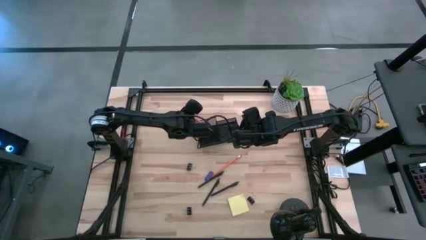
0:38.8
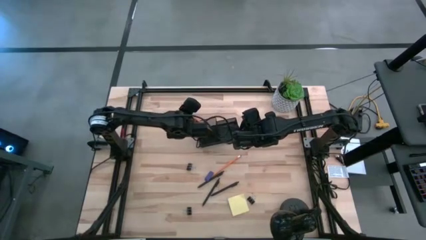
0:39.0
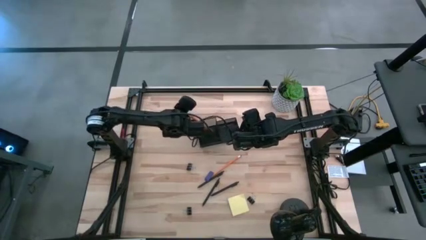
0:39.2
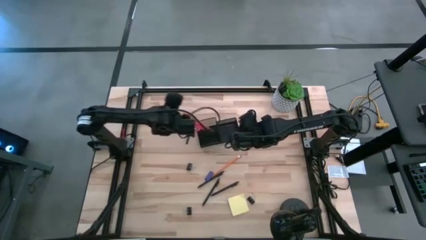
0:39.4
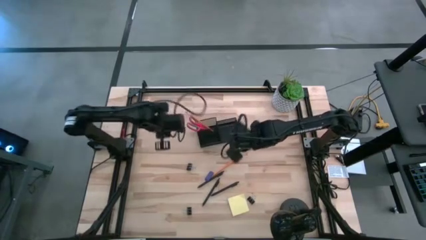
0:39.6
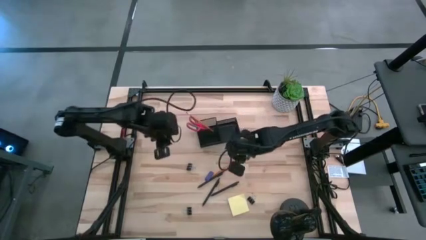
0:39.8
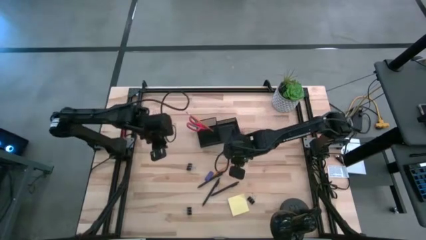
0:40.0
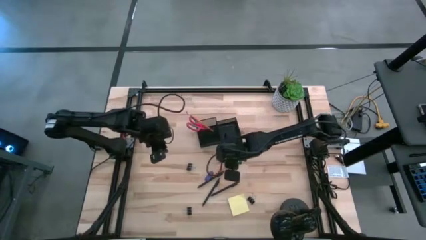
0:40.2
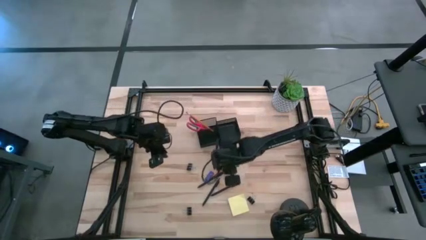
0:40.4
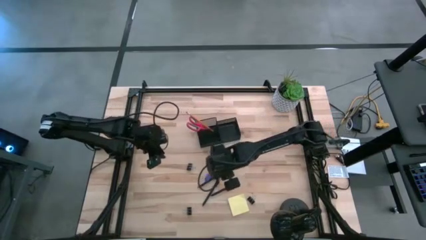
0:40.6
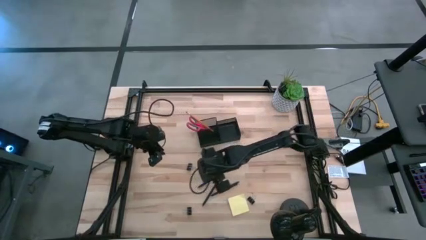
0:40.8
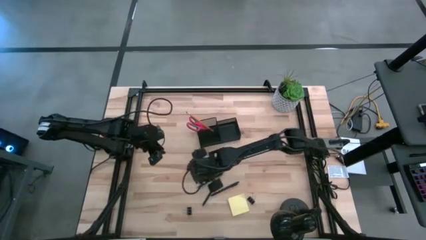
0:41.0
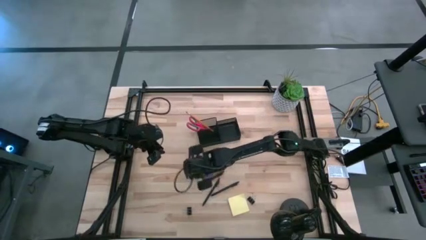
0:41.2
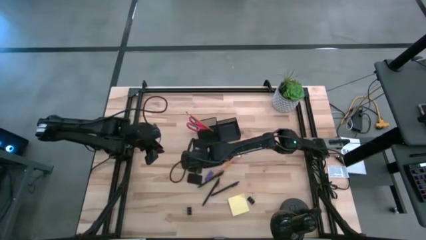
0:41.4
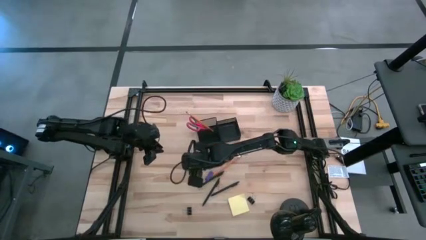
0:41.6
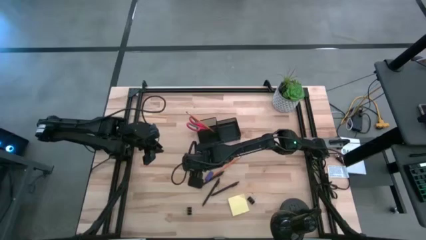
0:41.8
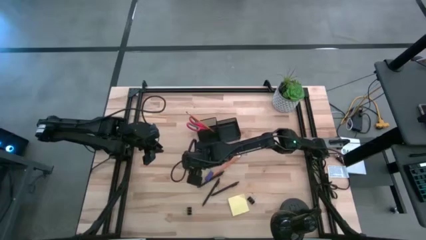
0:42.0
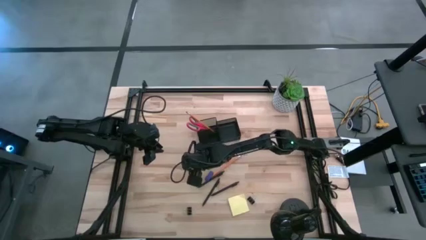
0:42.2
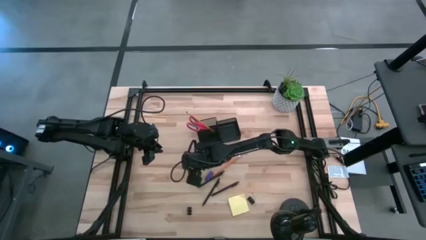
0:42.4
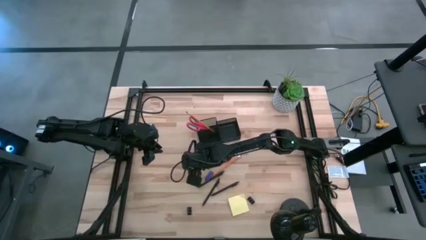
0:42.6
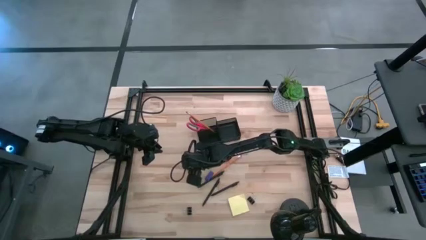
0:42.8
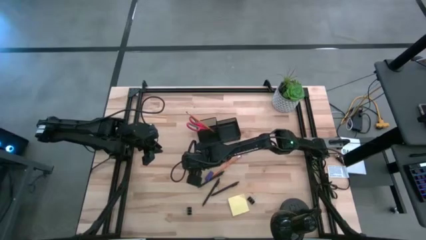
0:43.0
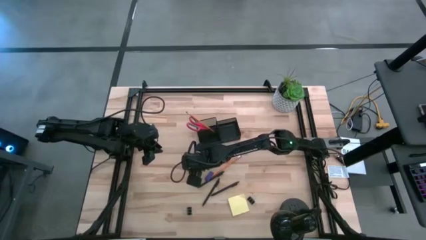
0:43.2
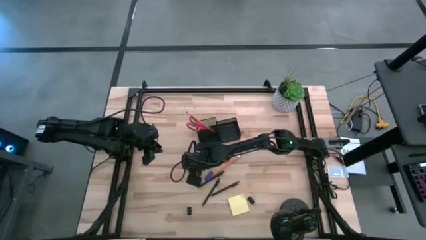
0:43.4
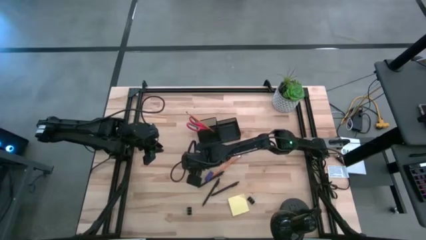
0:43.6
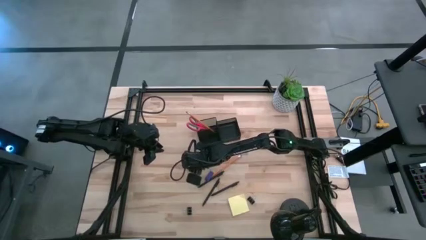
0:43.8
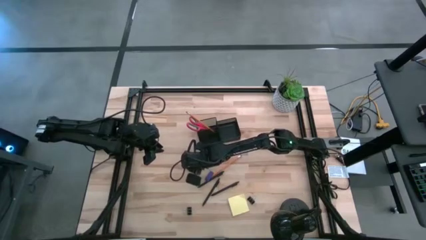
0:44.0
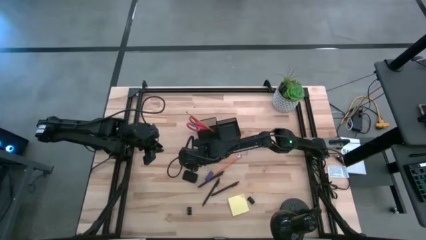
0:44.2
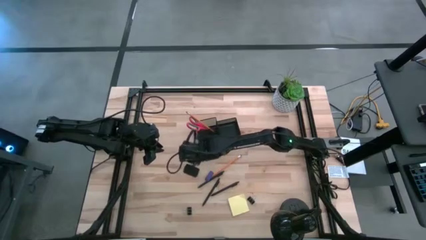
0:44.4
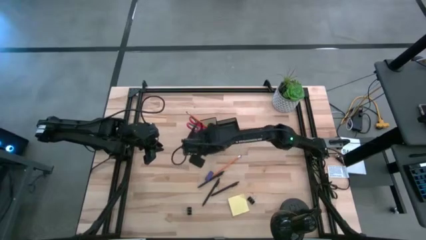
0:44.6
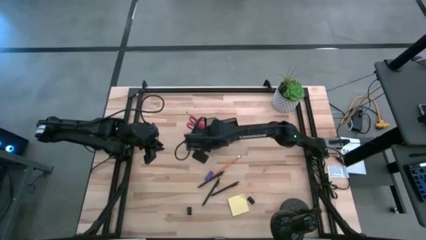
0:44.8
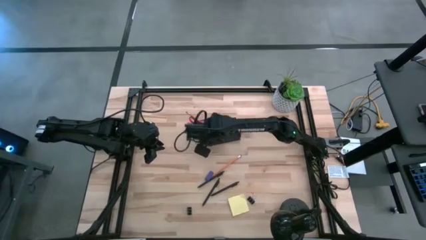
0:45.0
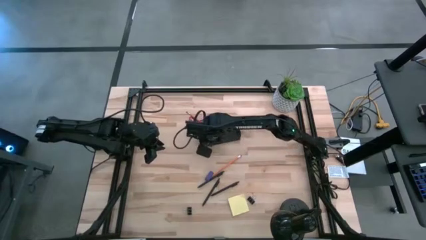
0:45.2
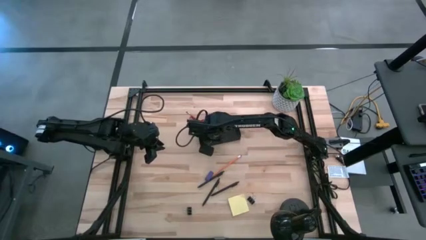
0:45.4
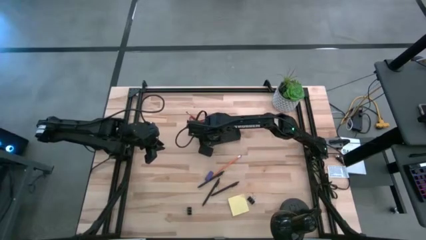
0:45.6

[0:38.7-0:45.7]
Task: Pick and place office supplies into organizer
Put the top binder clip into the bottom left section of the desk organizer

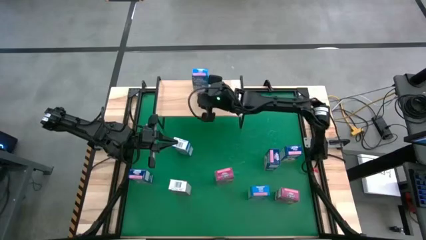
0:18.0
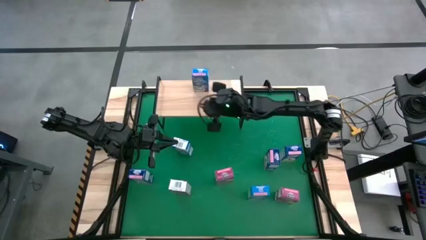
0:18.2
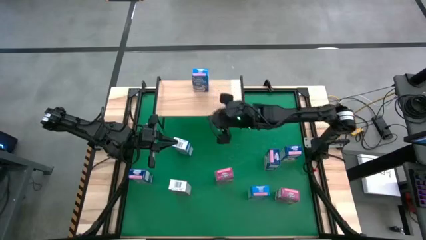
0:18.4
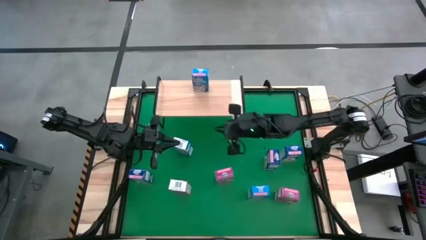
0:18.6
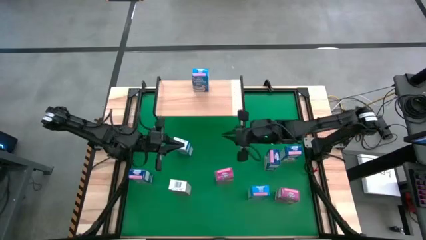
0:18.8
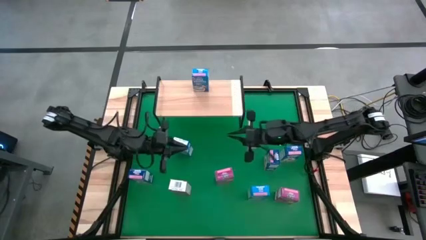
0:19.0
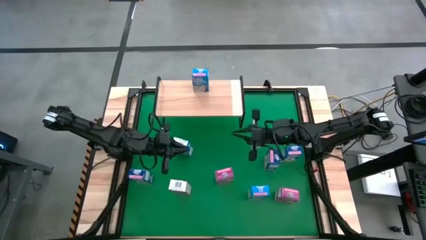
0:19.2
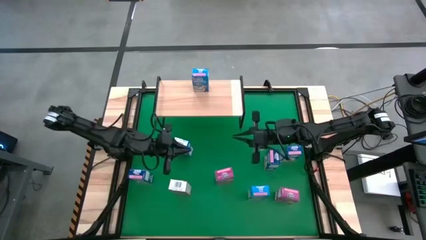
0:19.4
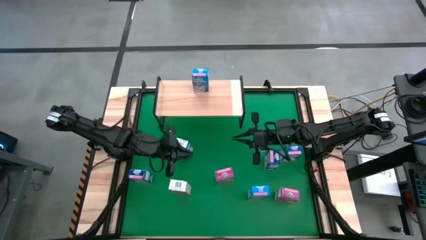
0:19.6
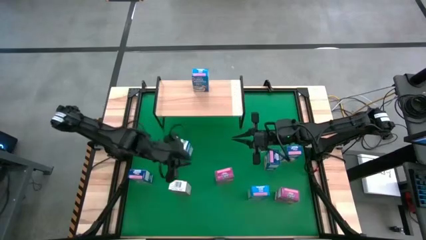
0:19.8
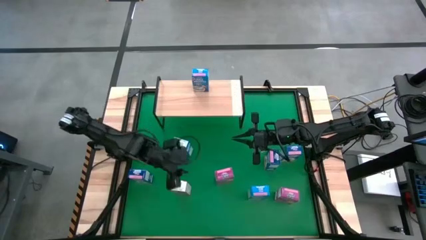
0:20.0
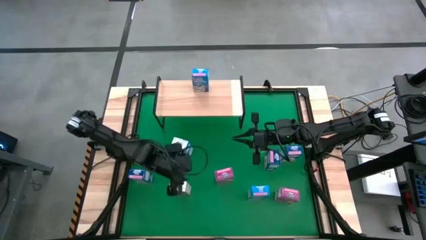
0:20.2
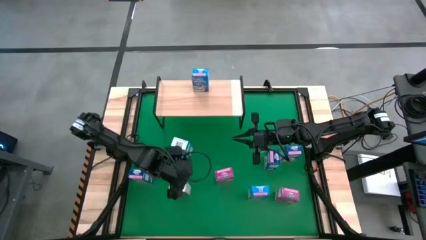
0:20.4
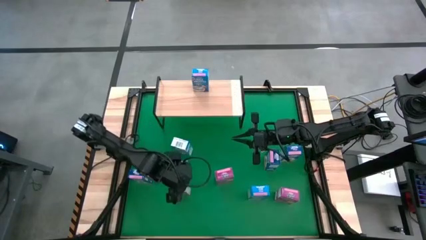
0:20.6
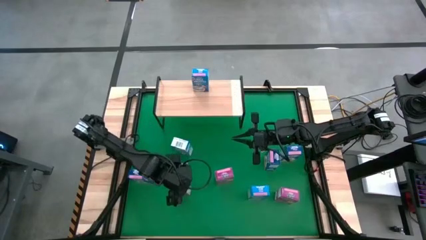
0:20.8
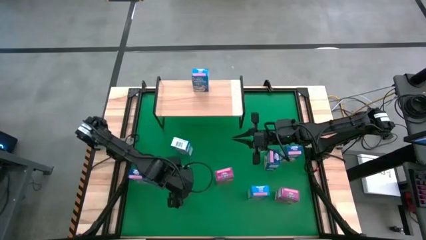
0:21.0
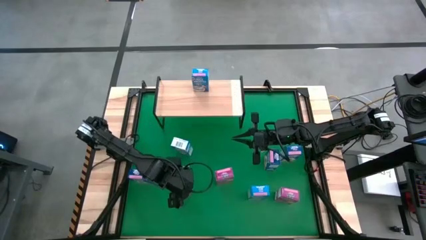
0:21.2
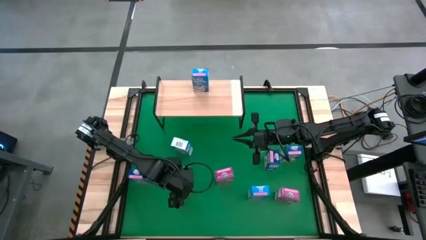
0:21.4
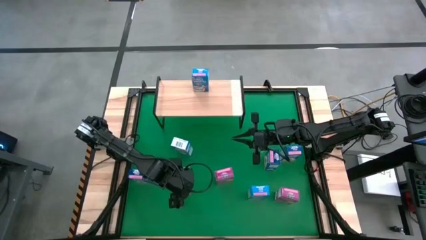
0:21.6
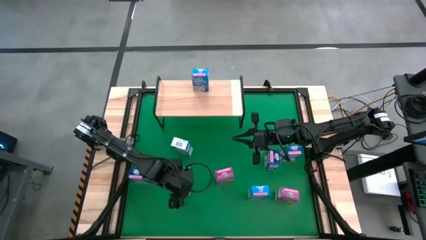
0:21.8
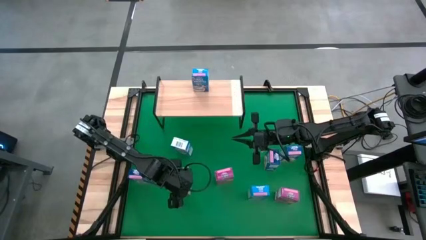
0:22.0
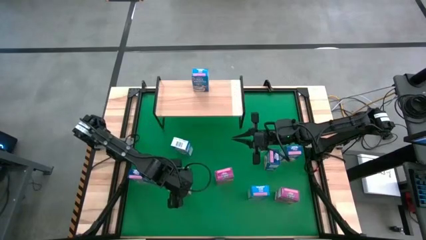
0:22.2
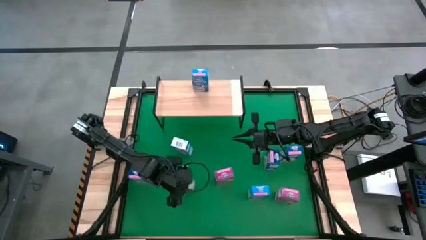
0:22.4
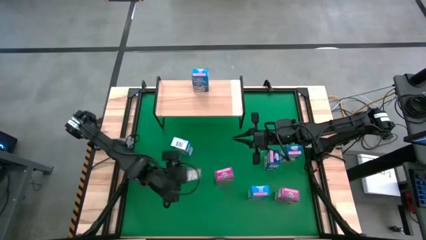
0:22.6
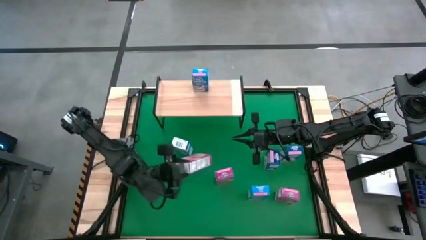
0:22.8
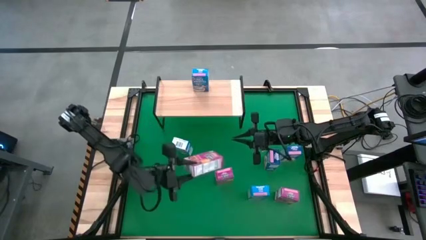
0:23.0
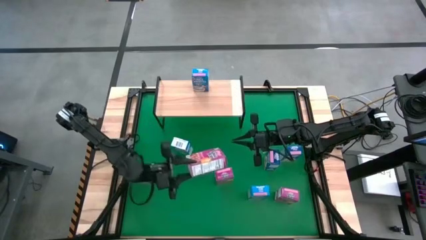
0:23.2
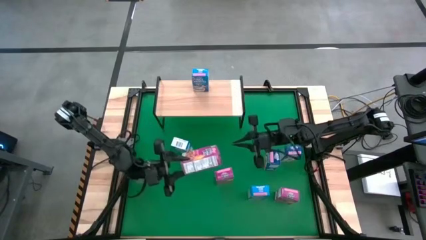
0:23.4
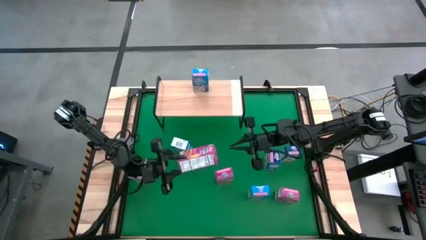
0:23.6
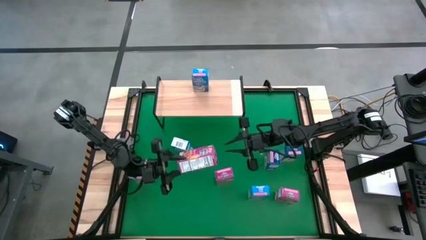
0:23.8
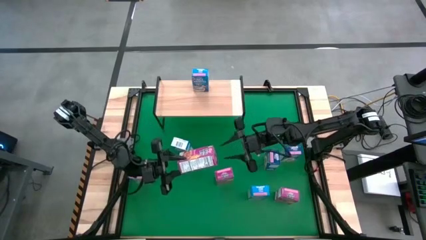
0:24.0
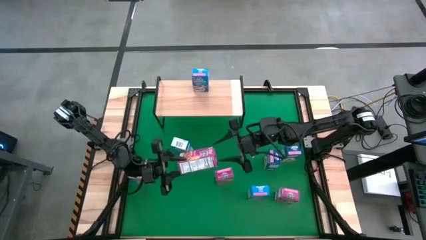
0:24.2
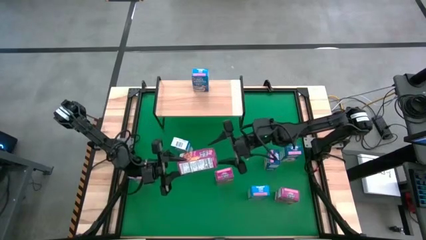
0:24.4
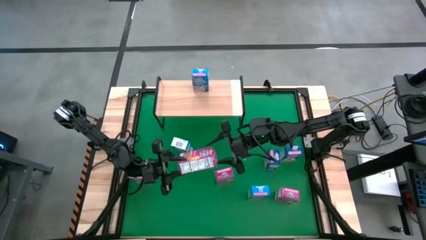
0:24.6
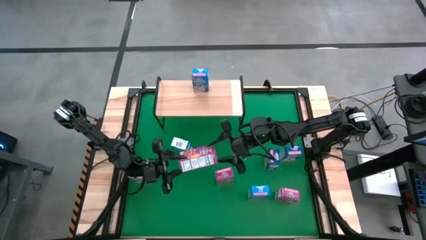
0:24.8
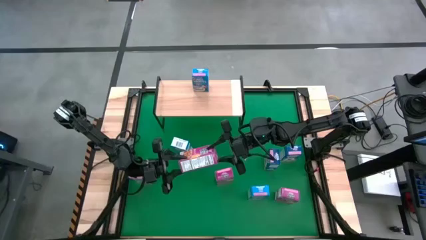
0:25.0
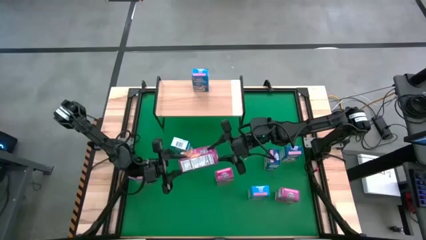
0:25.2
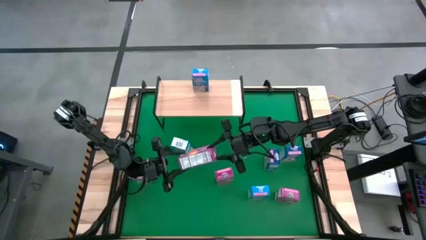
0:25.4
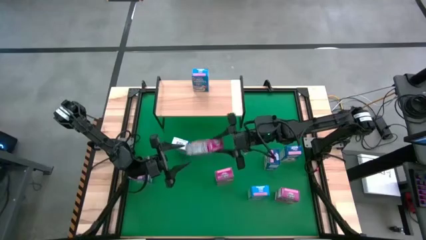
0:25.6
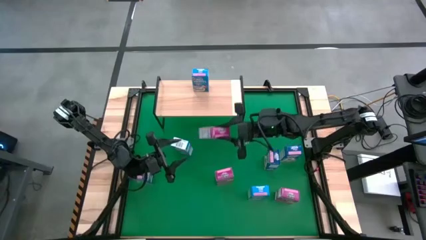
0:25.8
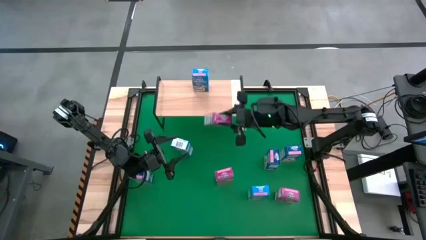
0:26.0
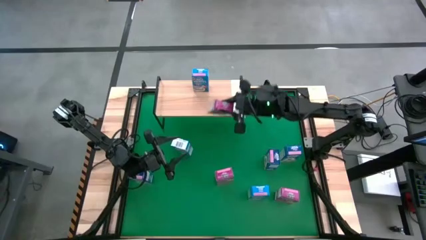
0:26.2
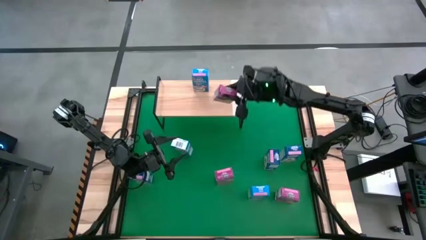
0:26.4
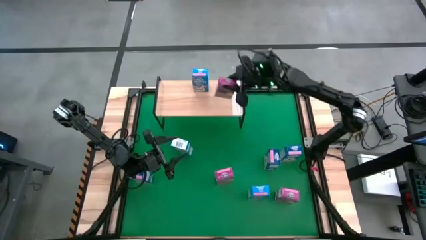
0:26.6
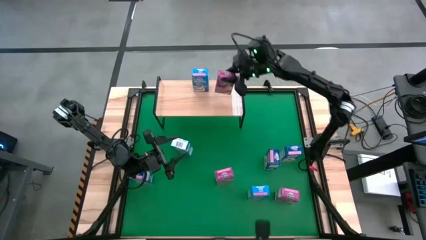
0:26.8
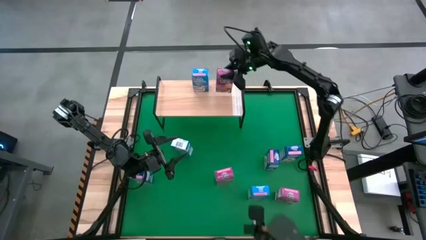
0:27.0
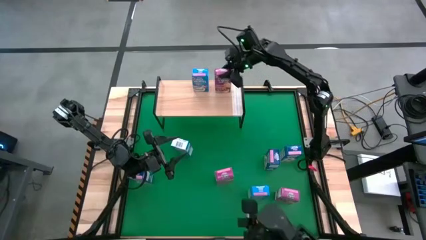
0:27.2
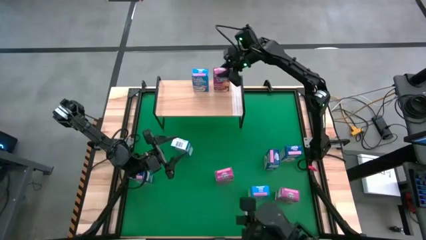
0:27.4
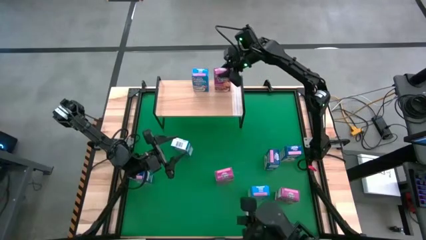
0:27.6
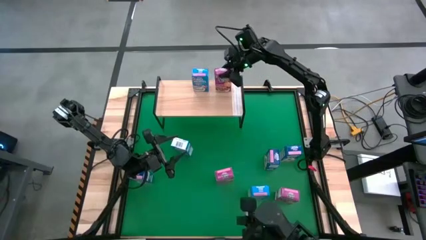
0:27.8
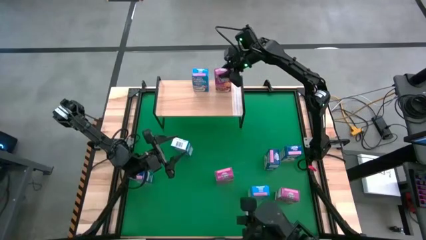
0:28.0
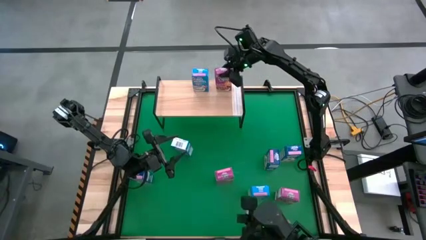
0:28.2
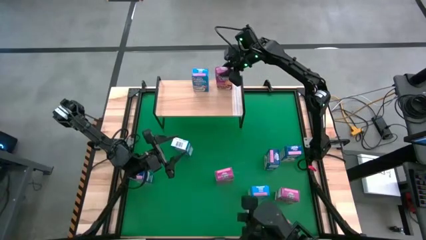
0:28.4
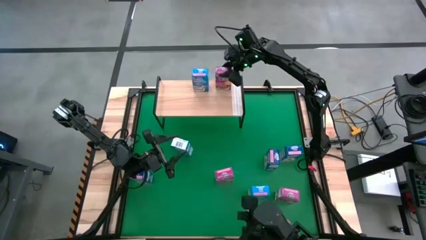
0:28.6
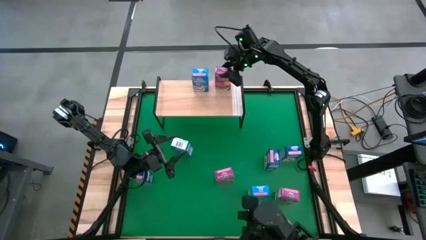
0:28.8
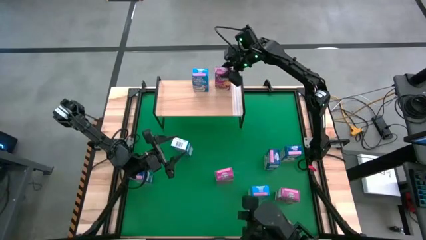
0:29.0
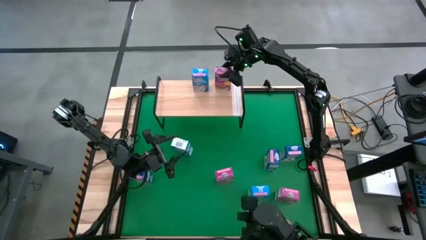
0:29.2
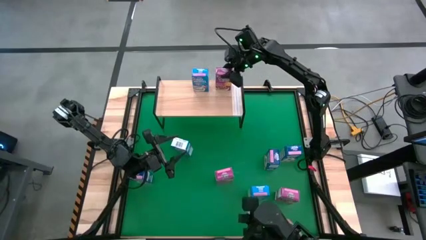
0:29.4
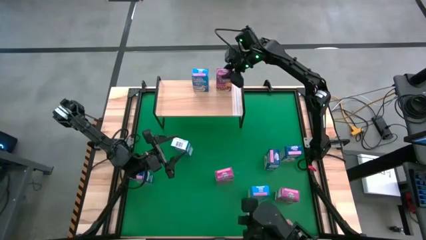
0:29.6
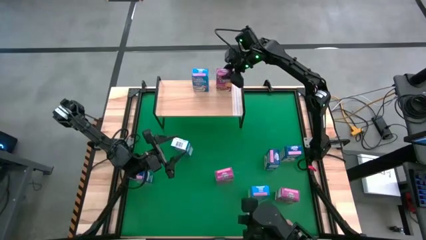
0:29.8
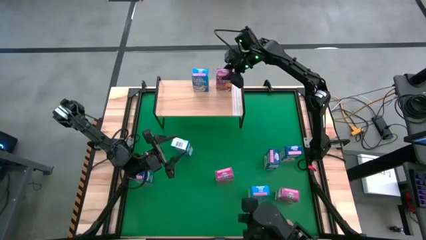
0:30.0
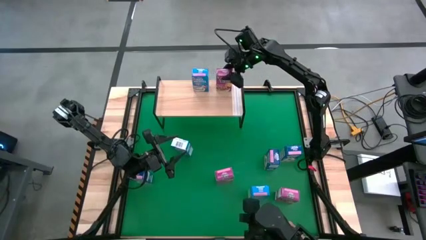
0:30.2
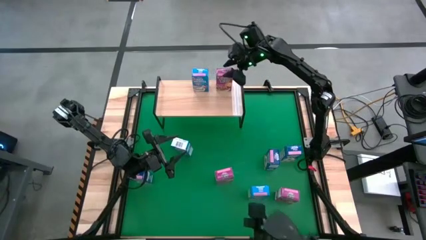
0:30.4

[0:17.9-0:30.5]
Task: Stack cereal on shelf
Put the left pink cereal box on the shelf
